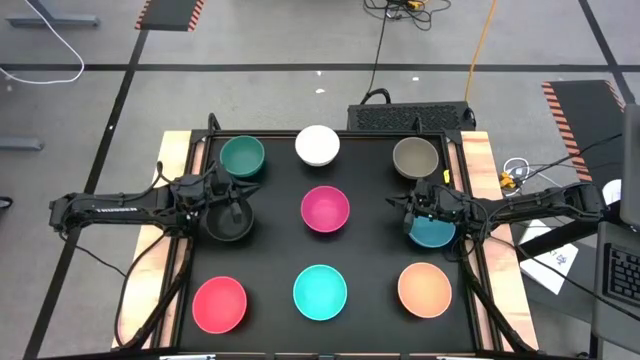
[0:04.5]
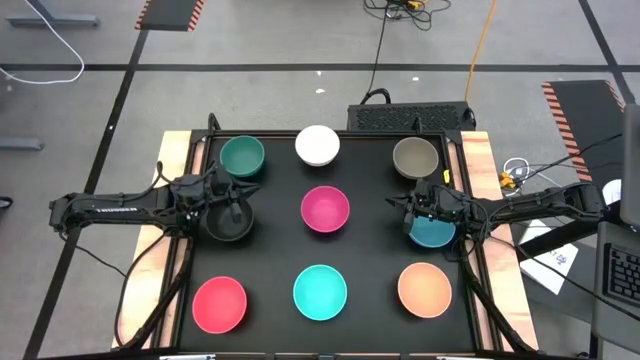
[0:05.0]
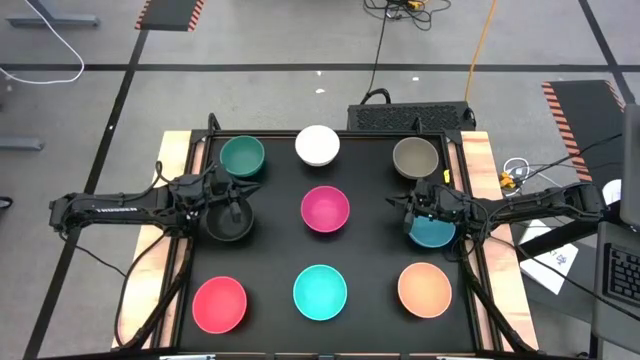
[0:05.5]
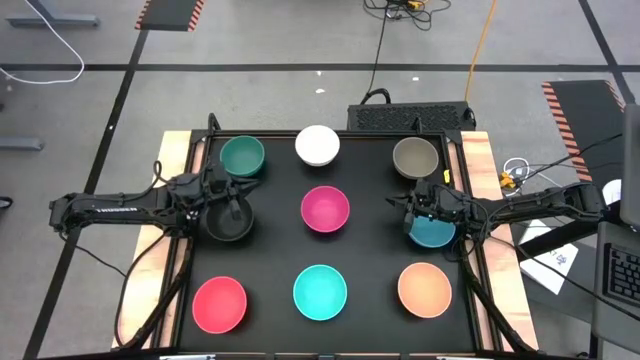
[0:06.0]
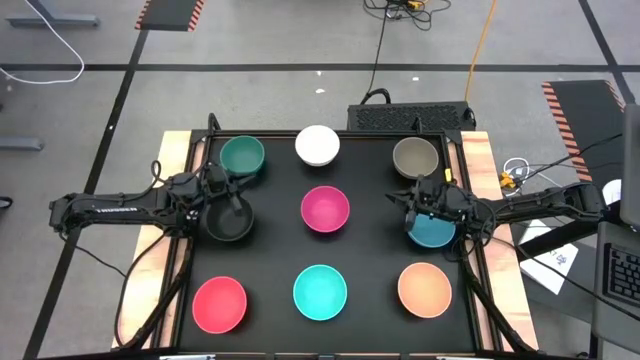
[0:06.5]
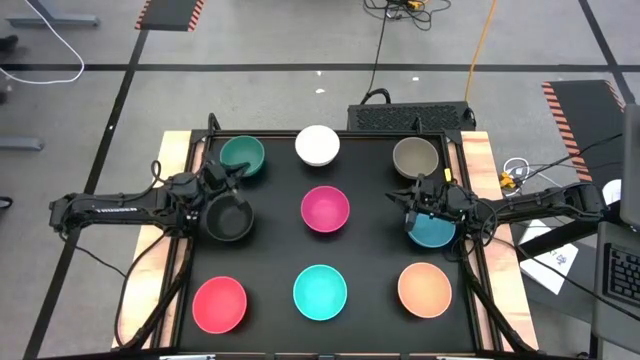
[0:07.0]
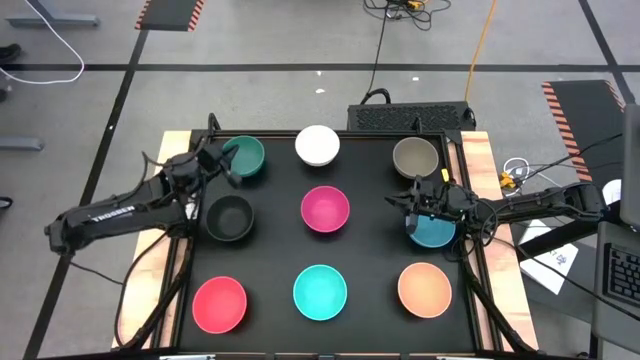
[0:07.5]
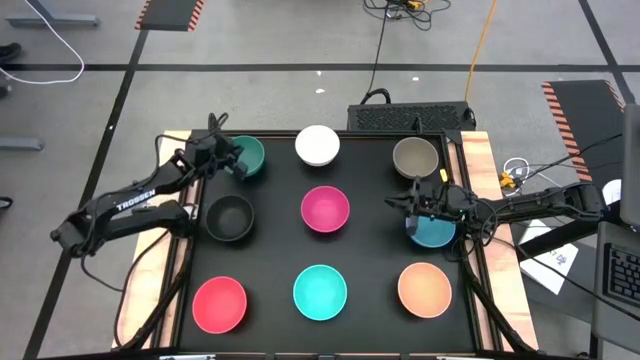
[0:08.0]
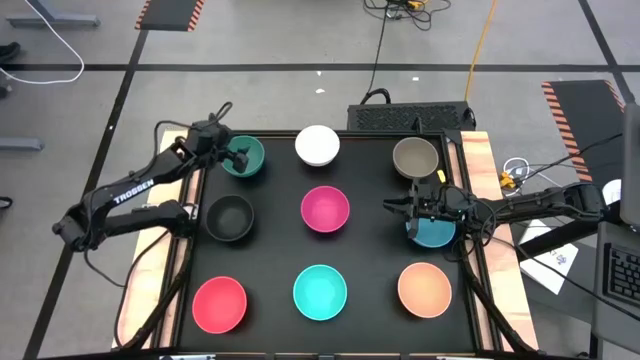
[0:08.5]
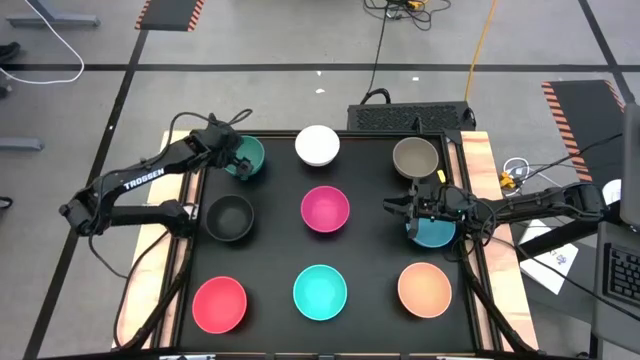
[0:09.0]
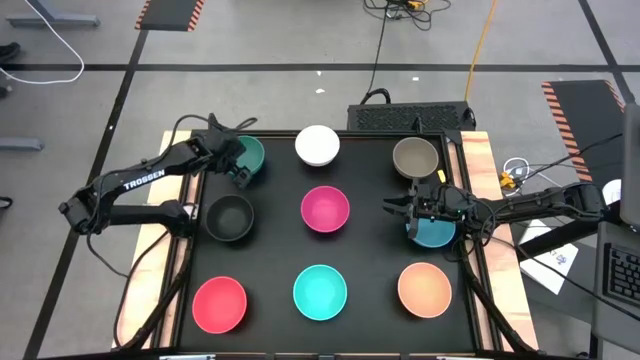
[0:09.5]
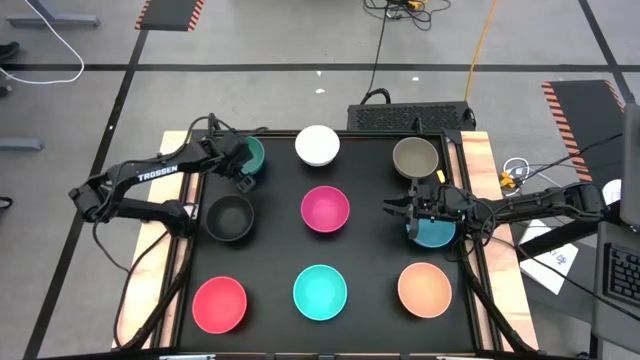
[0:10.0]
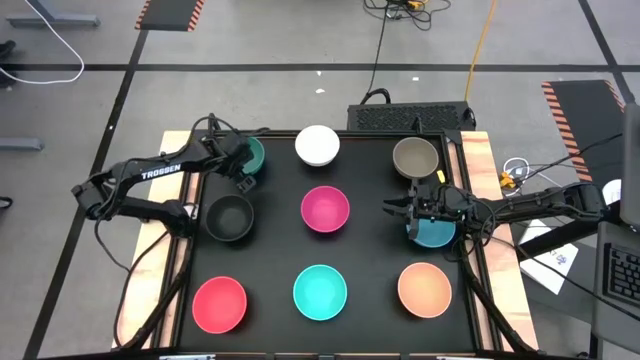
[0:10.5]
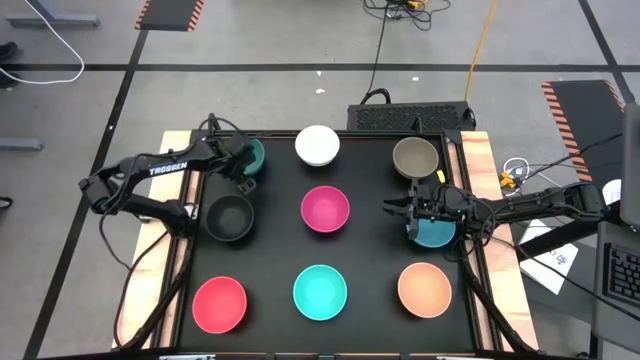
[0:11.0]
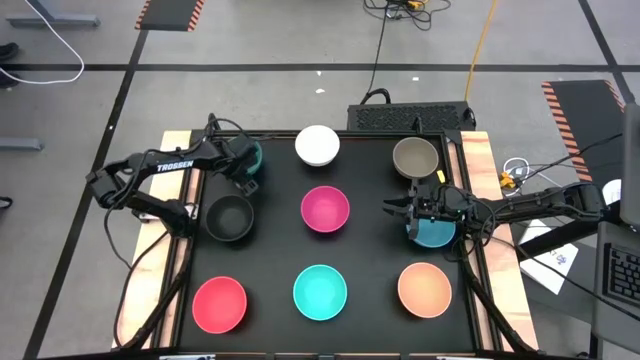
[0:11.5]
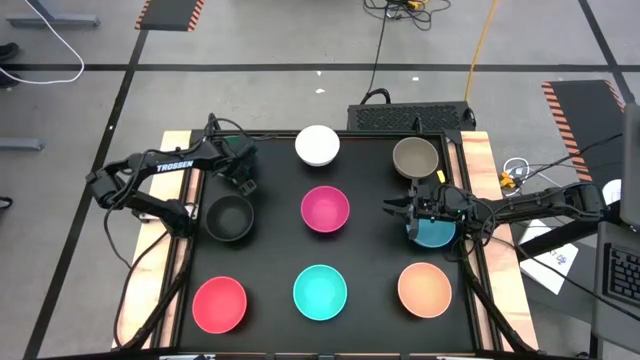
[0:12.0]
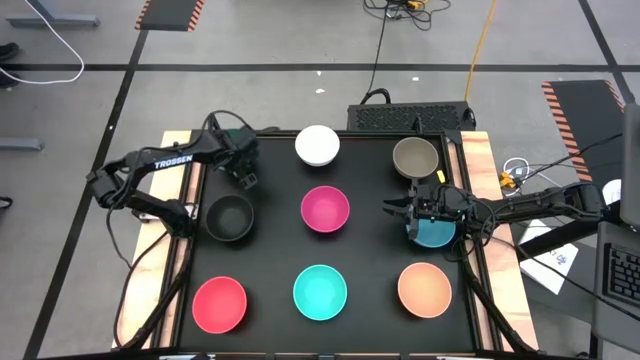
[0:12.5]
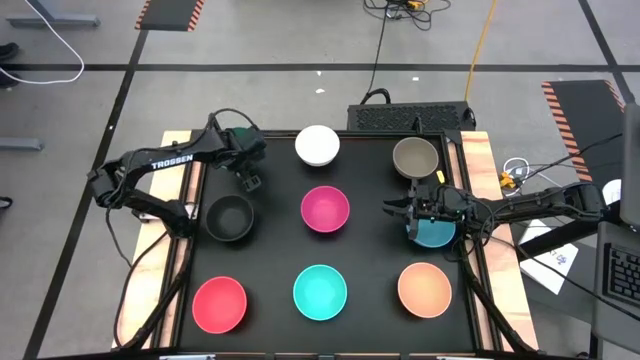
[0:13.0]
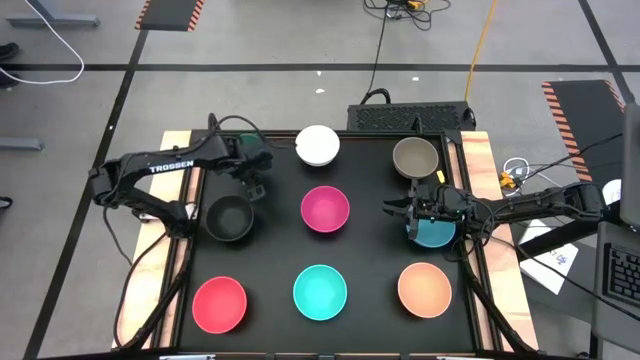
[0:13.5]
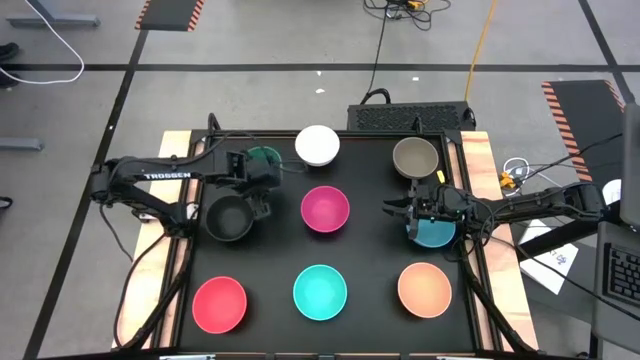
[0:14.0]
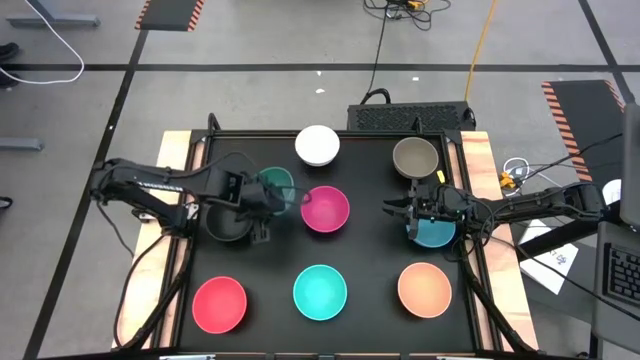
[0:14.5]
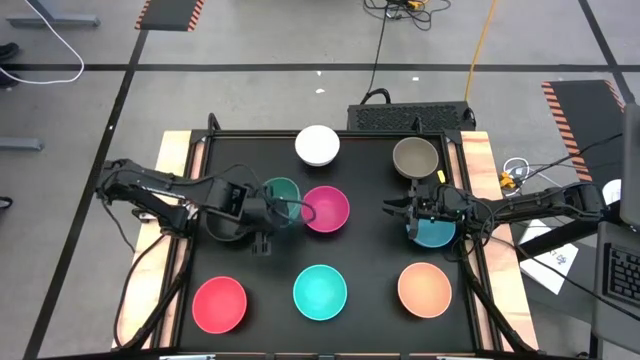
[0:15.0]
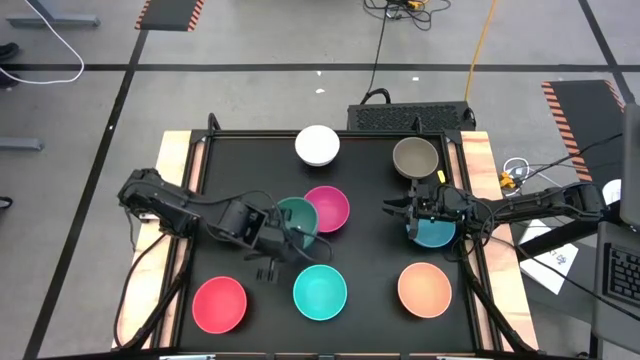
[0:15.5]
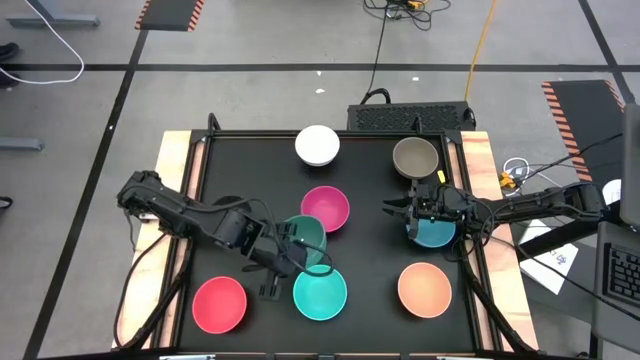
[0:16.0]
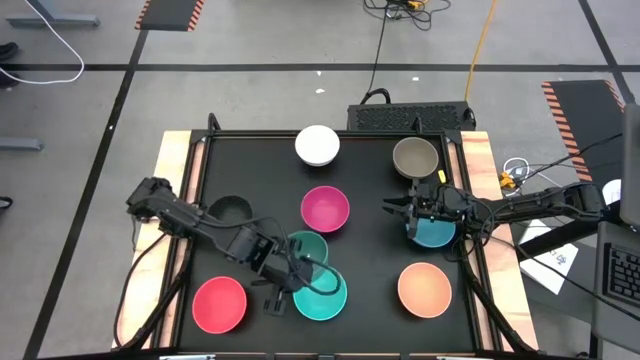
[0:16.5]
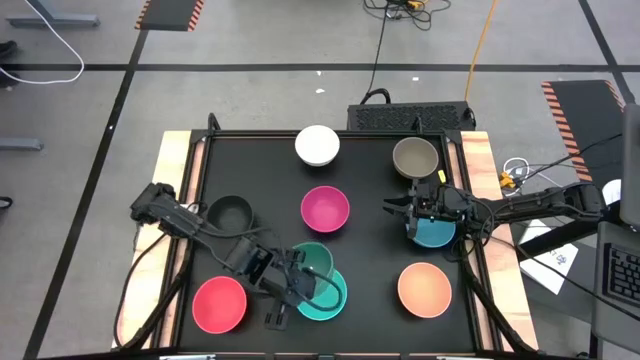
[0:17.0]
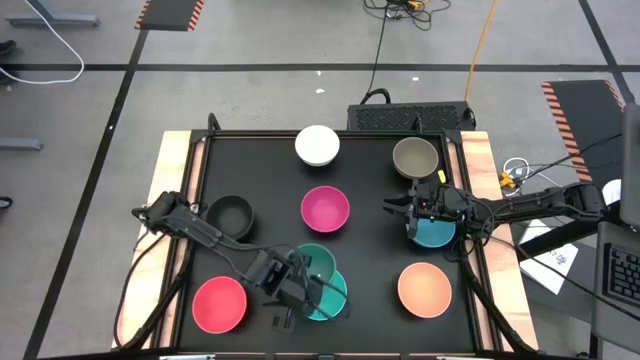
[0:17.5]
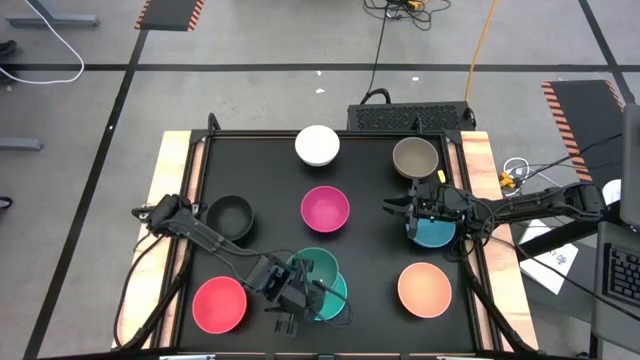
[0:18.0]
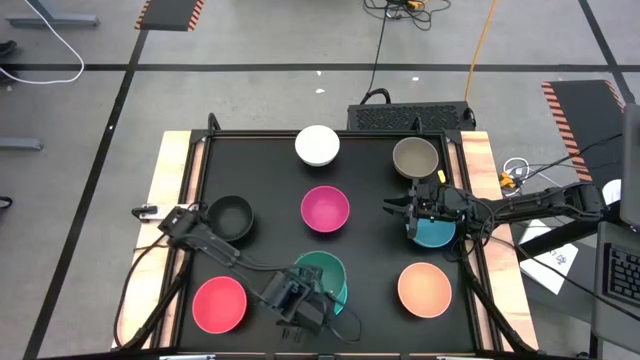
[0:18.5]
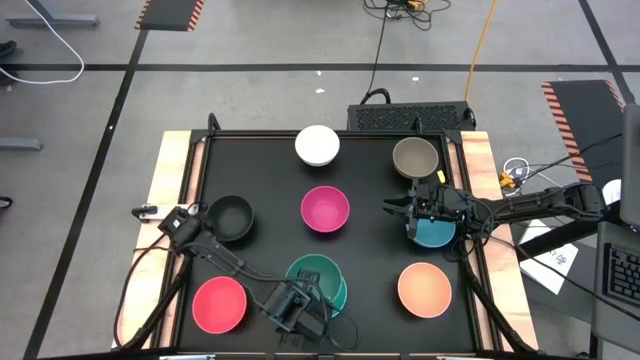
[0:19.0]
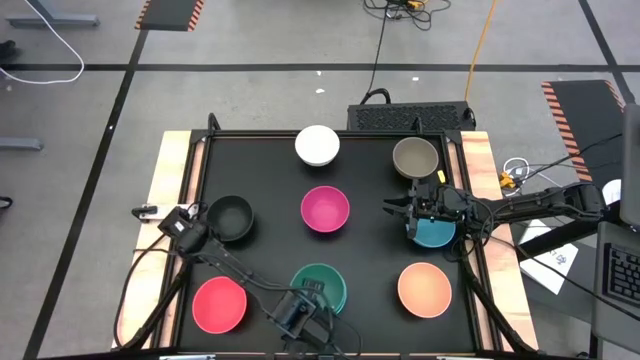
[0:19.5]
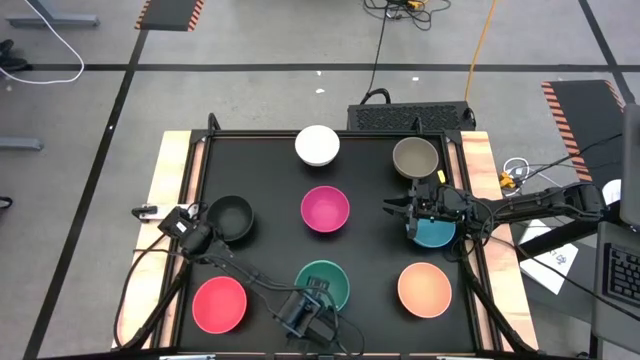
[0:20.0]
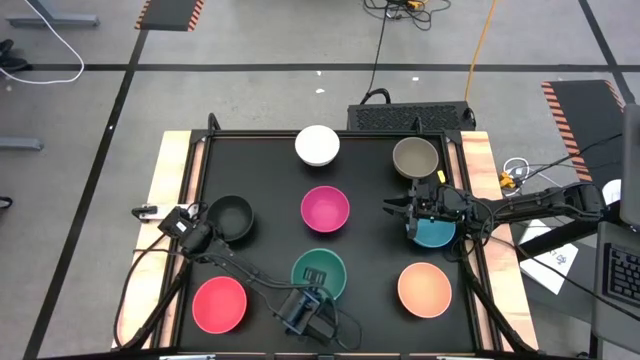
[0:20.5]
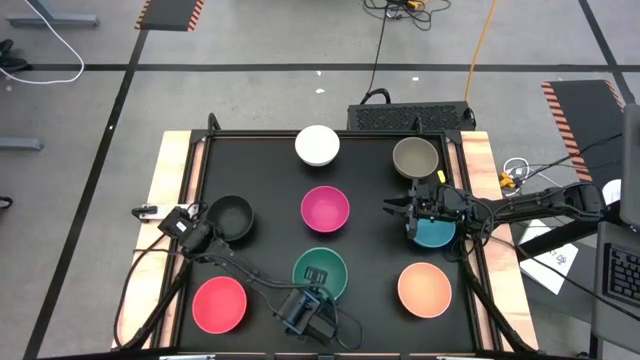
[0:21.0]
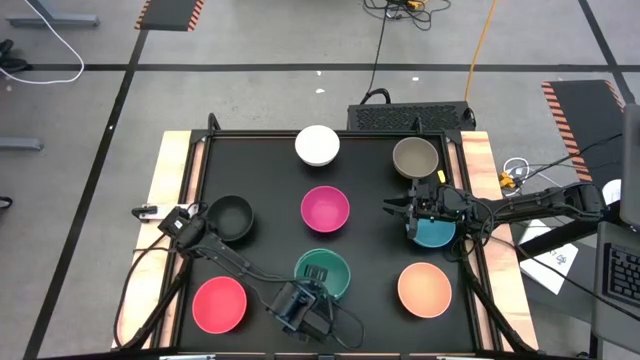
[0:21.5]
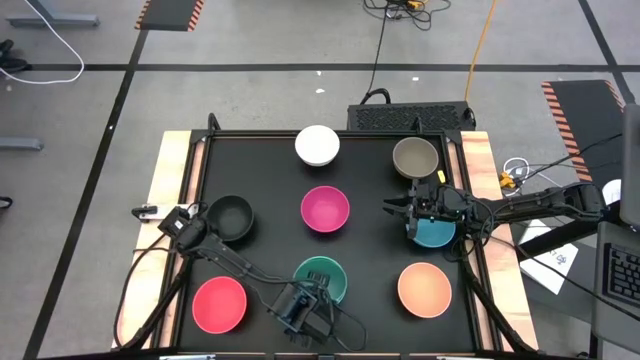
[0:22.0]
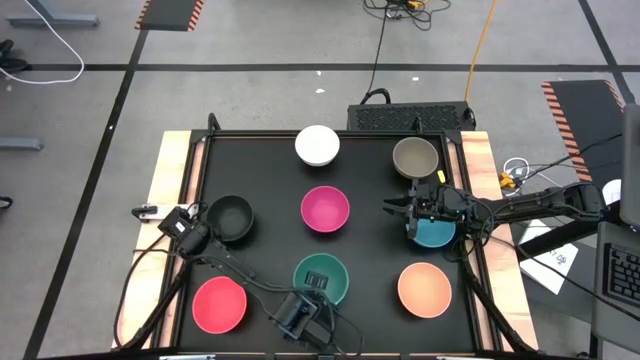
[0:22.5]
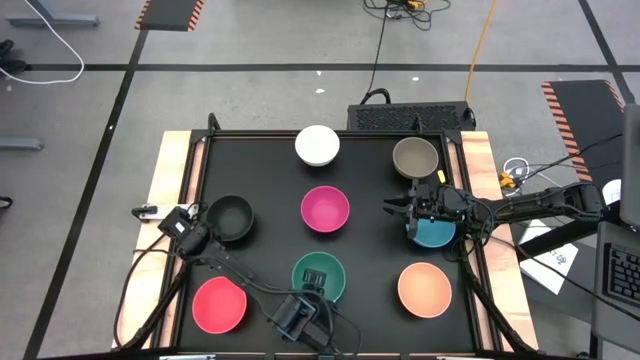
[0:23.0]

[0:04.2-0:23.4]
Task: Nest bowls inside each other
Stack the dark green bowl on the light green bowl
